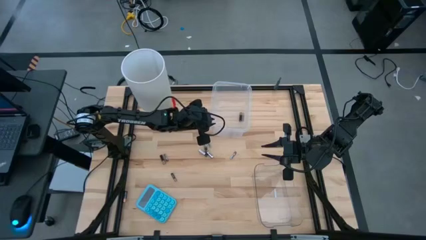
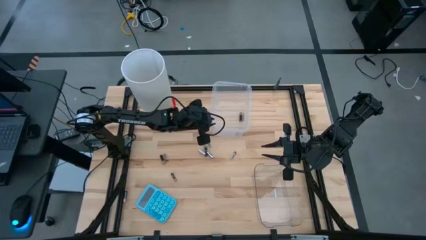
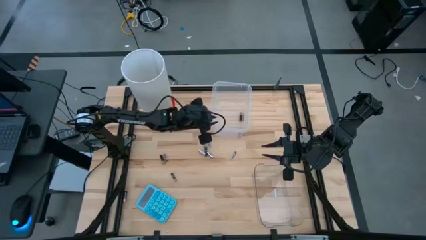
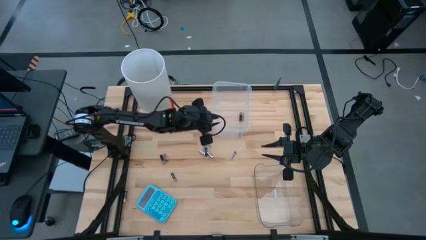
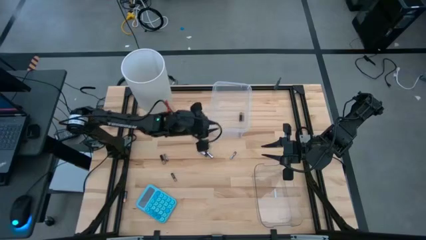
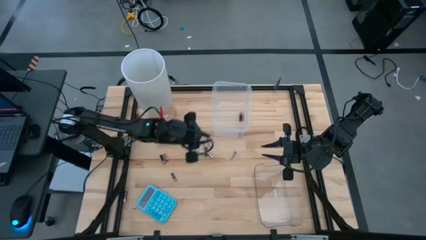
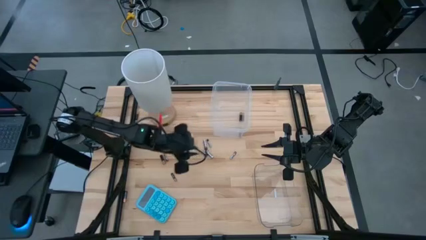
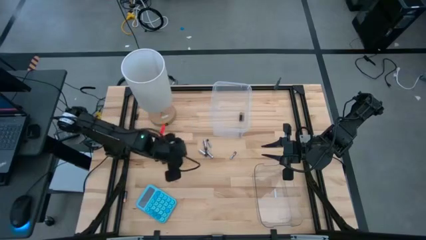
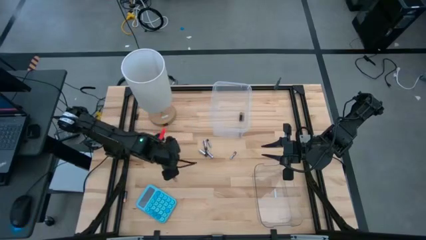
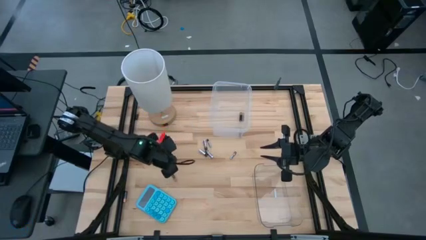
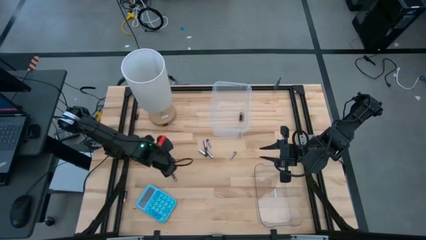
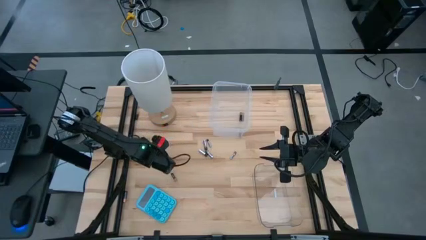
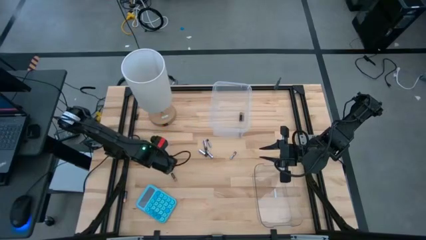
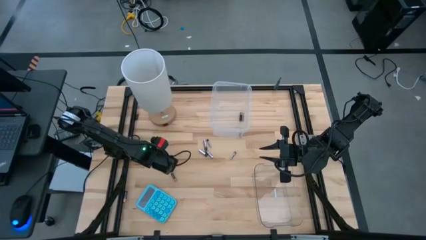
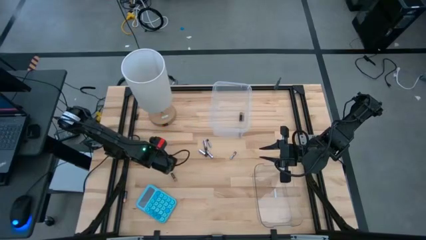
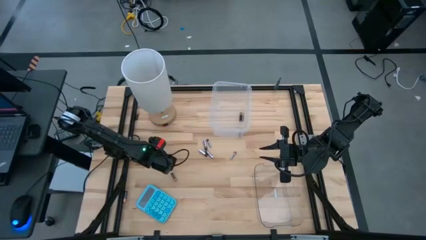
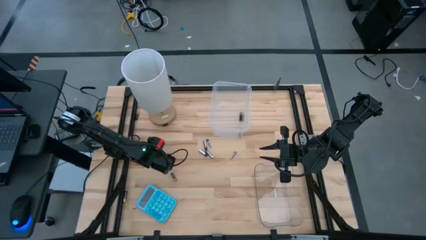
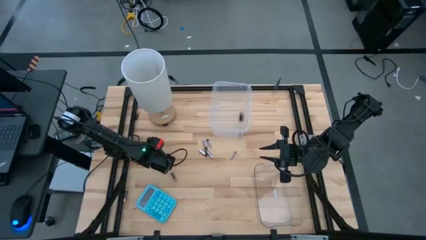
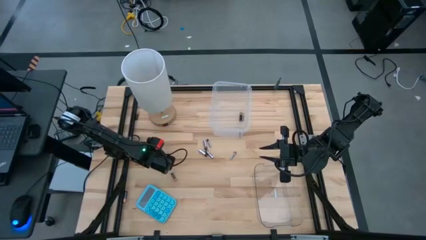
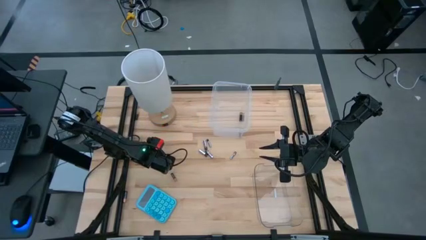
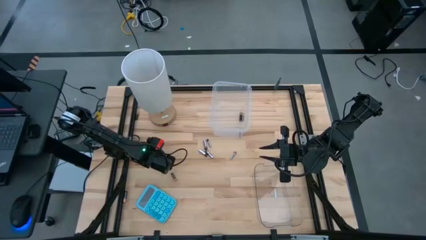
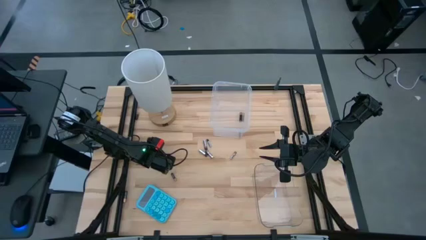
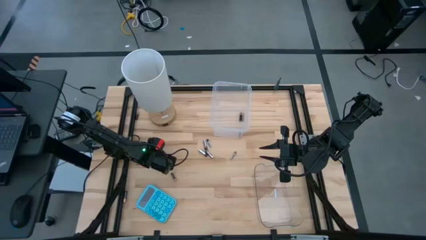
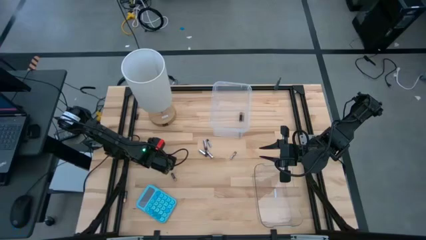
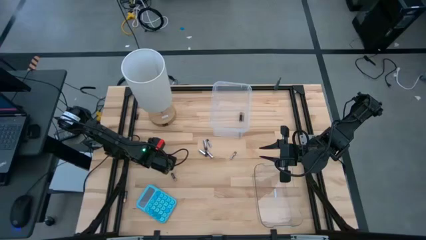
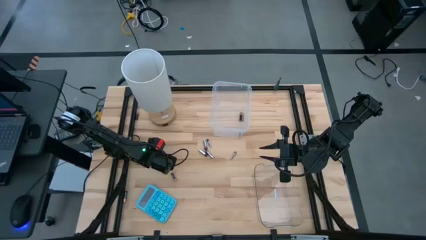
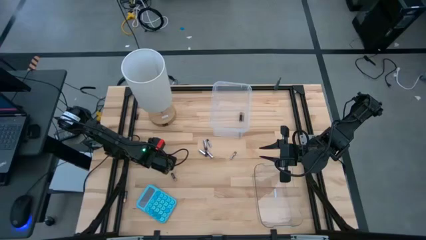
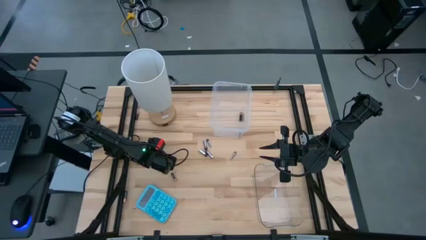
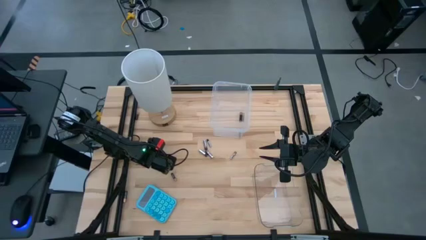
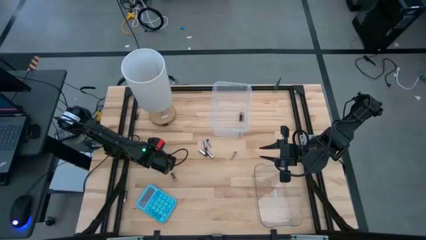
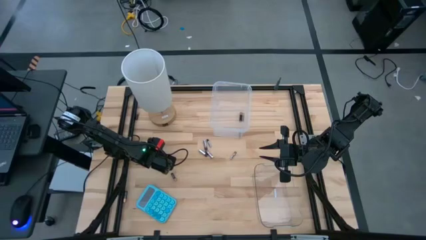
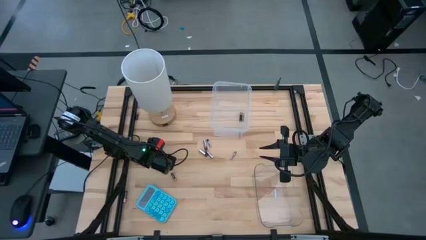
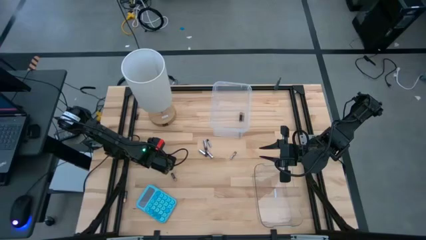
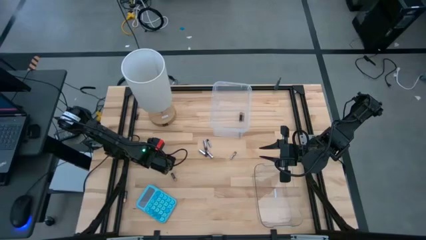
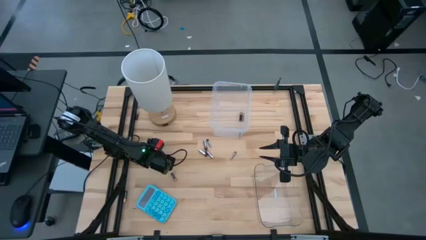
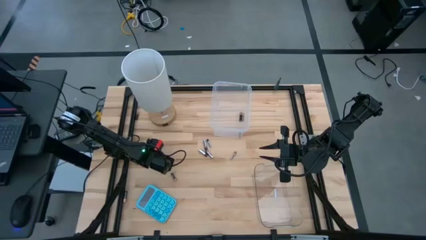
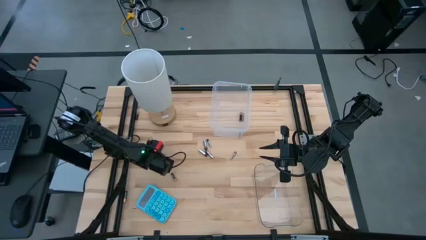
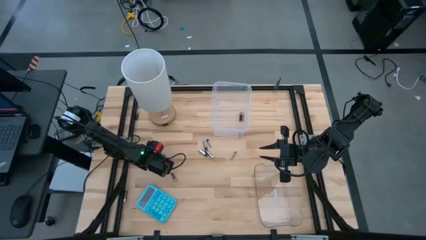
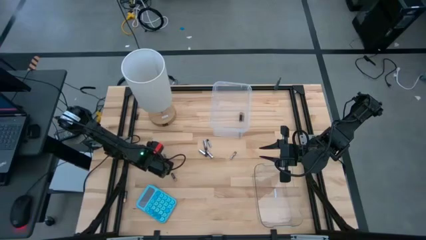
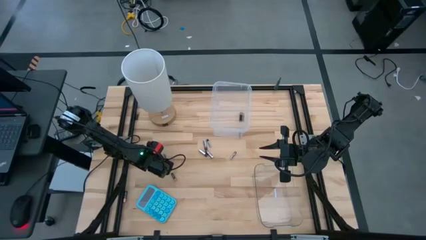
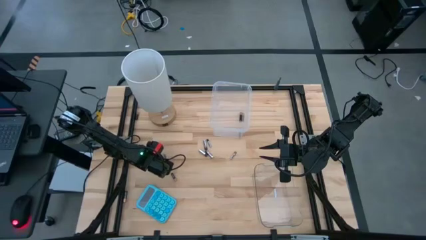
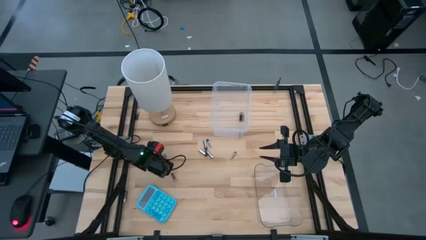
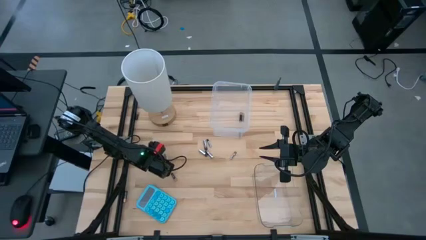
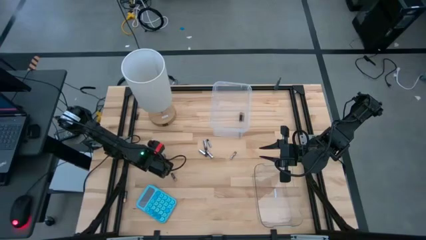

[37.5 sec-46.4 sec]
Task: Sort batteries
Put the brown battery into the top transparent bin

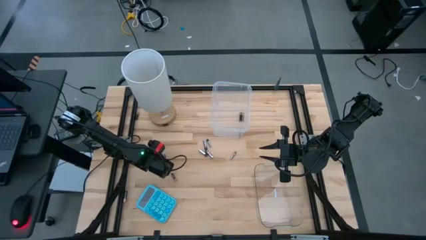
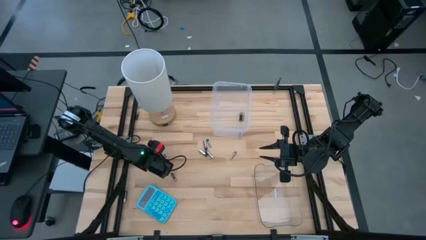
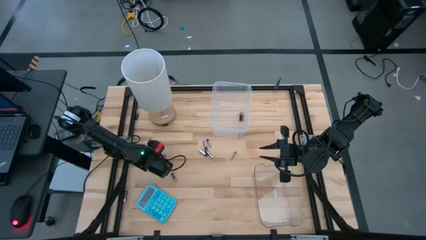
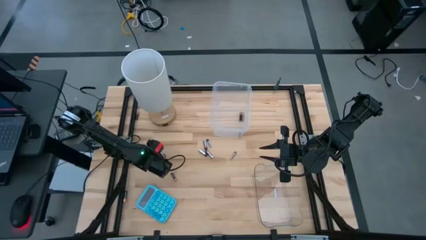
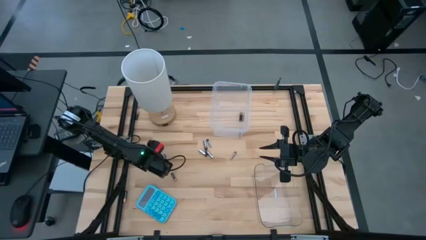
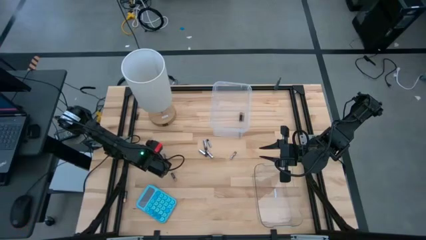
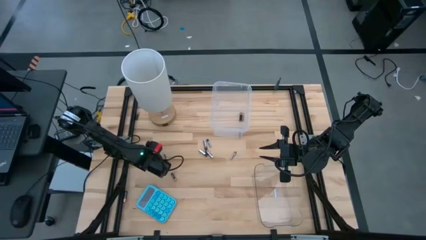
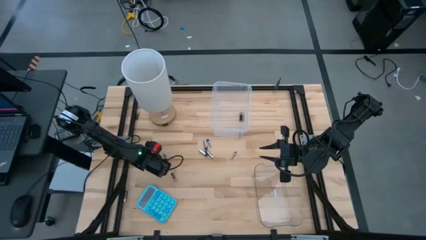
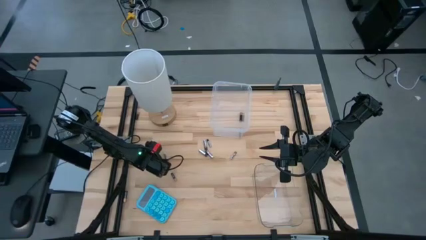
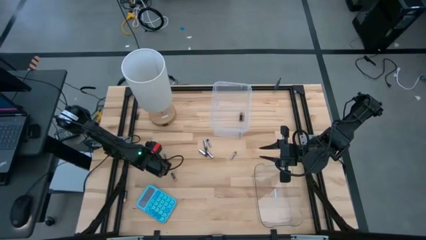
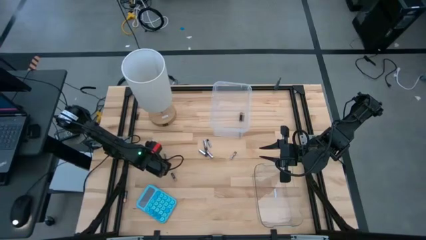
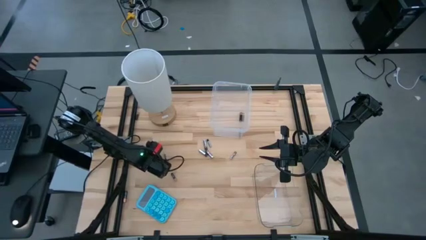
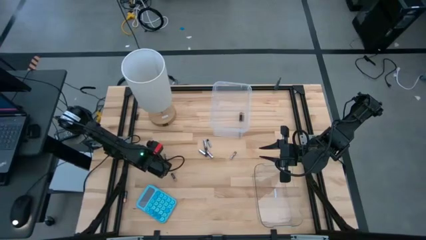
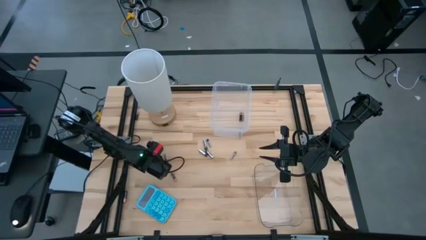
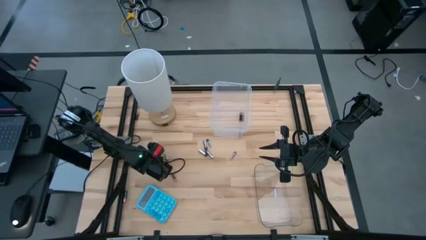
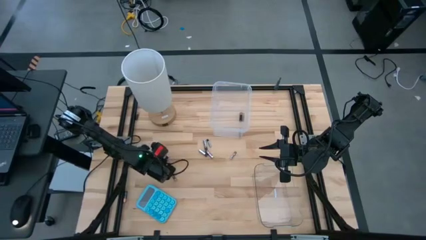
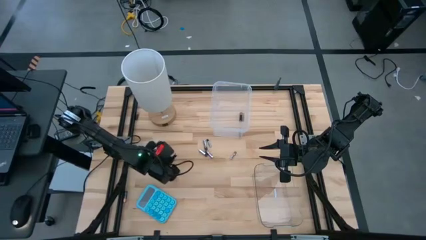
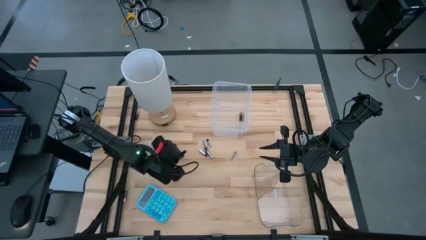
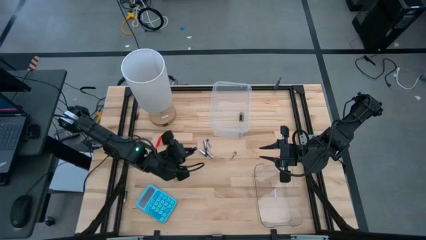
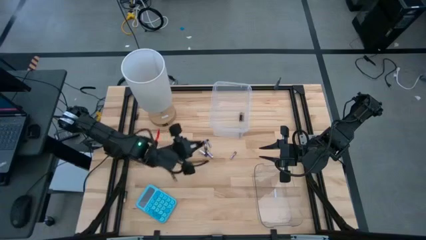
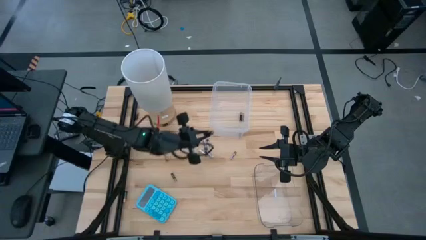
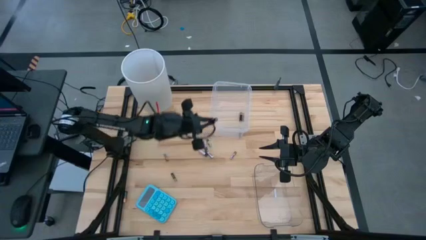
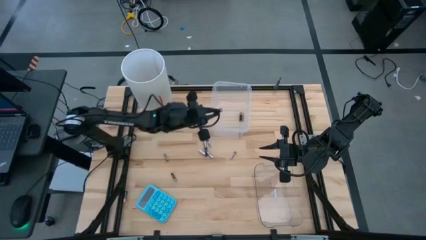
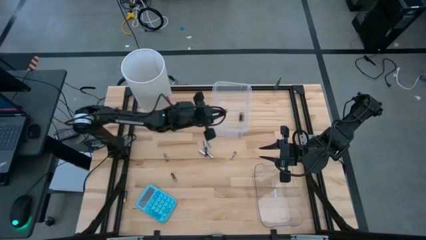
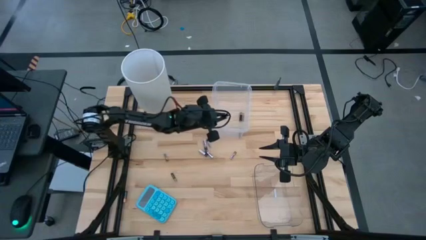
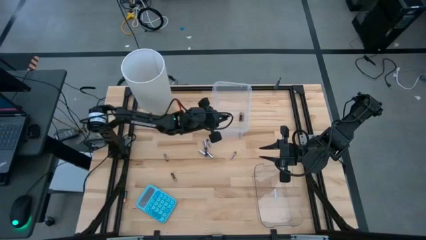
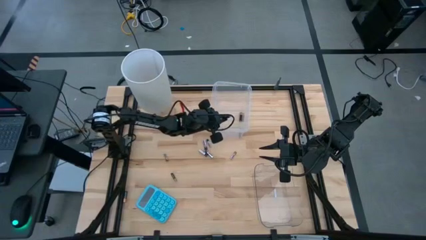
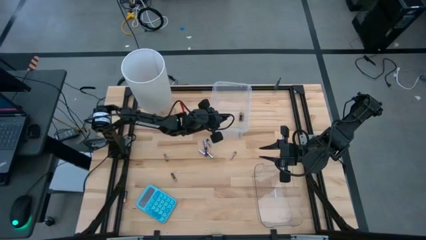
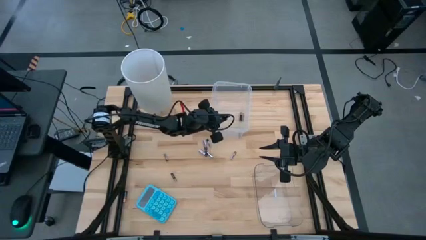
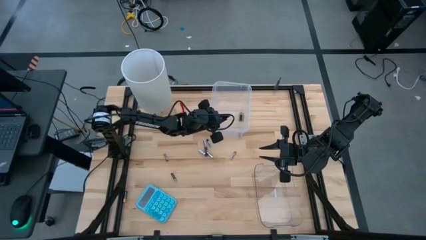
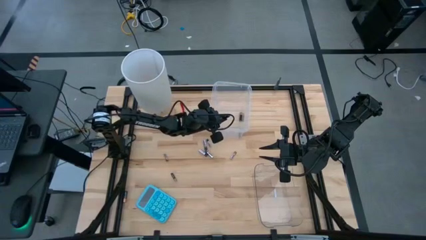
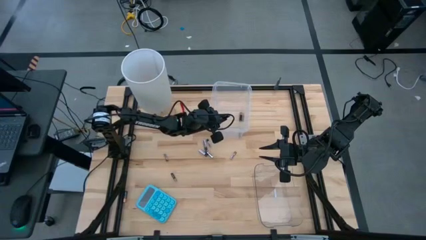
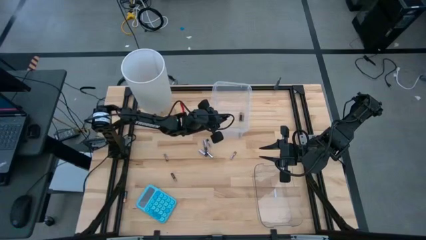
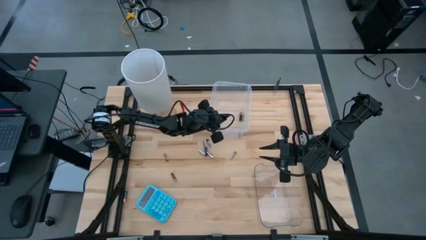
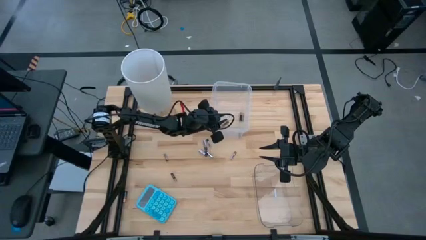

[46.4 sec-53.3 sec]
Put the brown battery into the top transparent bin
